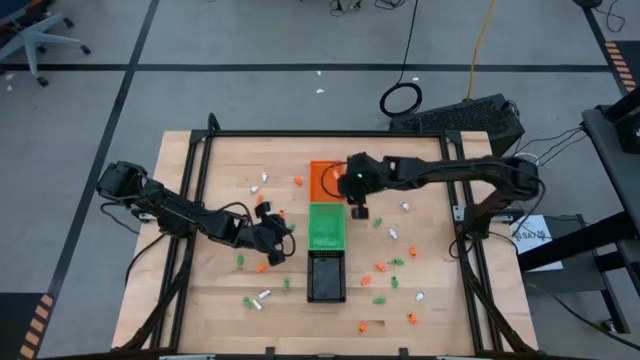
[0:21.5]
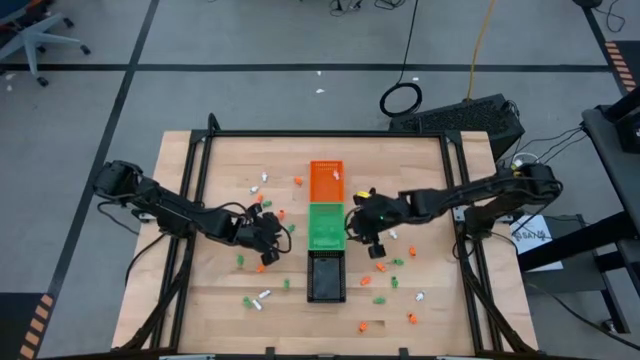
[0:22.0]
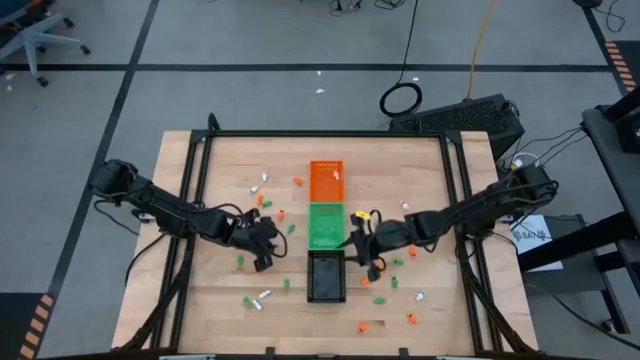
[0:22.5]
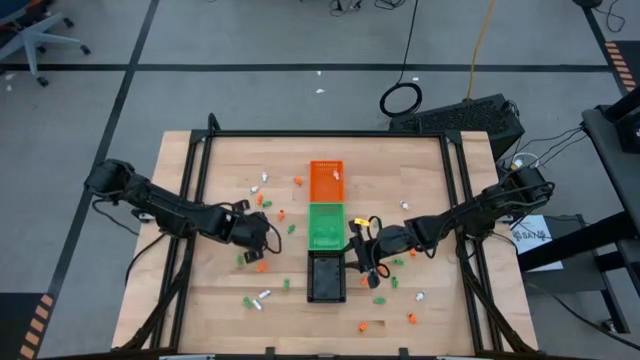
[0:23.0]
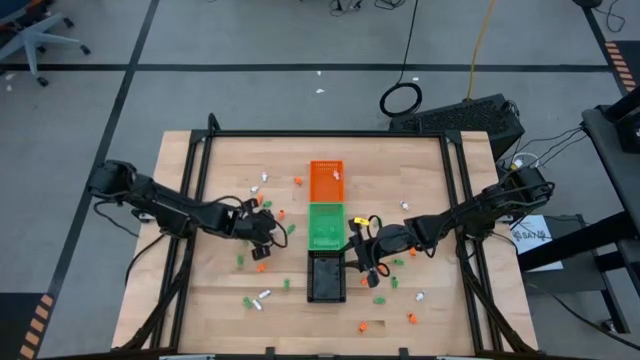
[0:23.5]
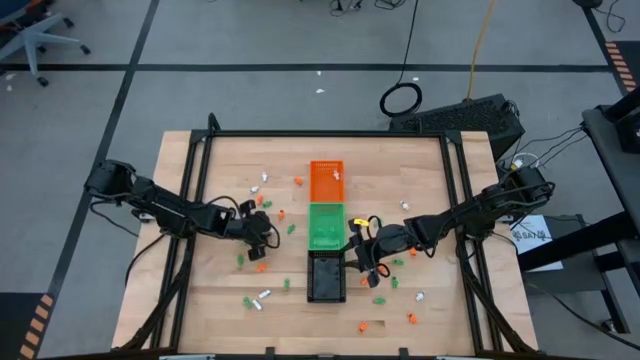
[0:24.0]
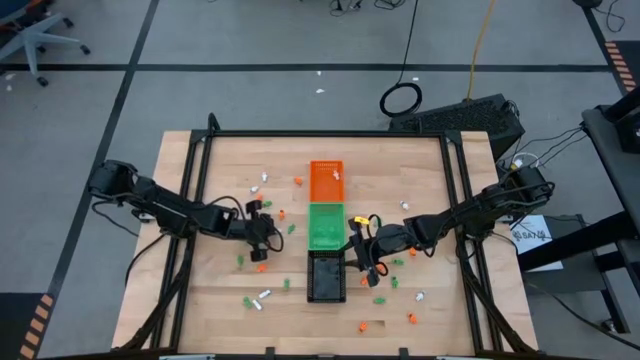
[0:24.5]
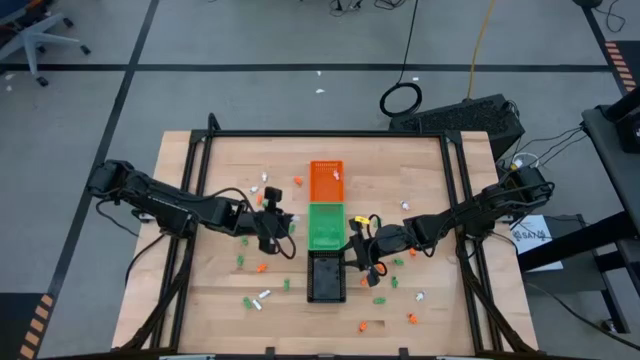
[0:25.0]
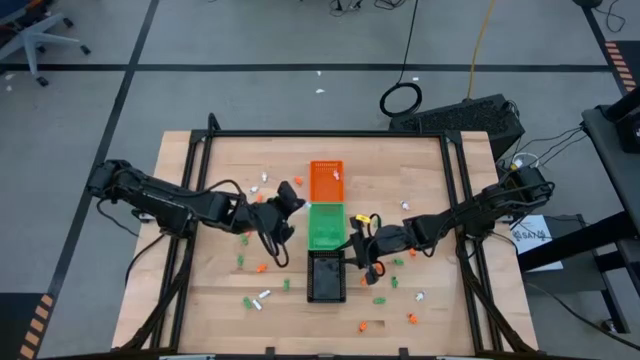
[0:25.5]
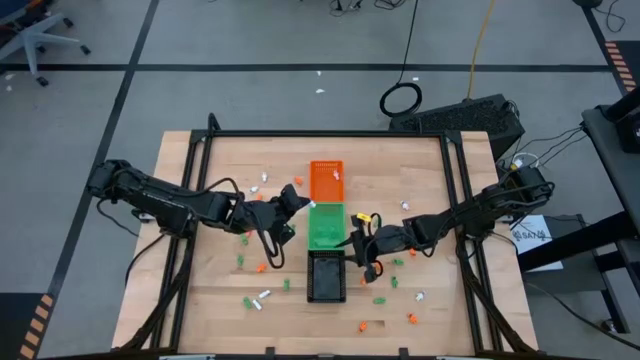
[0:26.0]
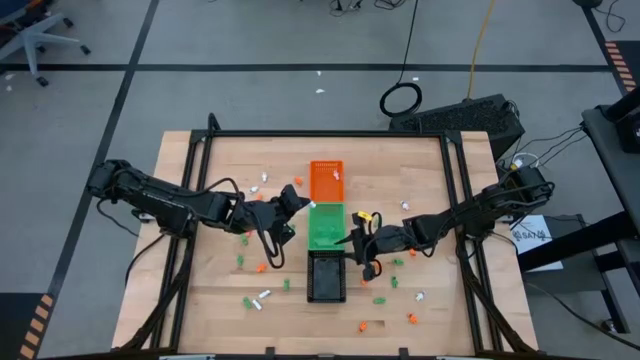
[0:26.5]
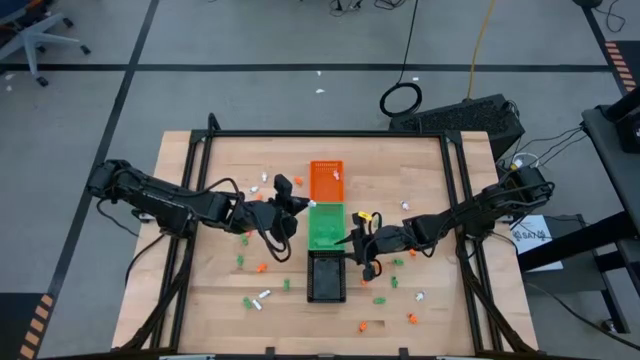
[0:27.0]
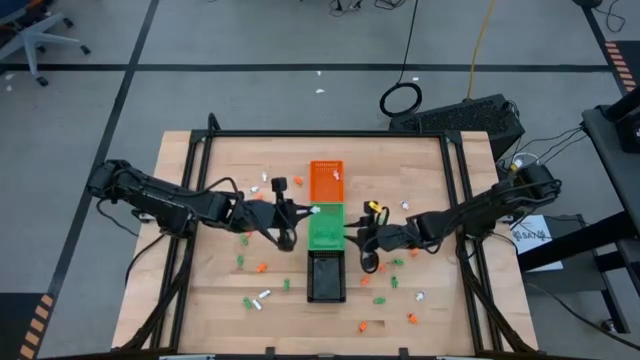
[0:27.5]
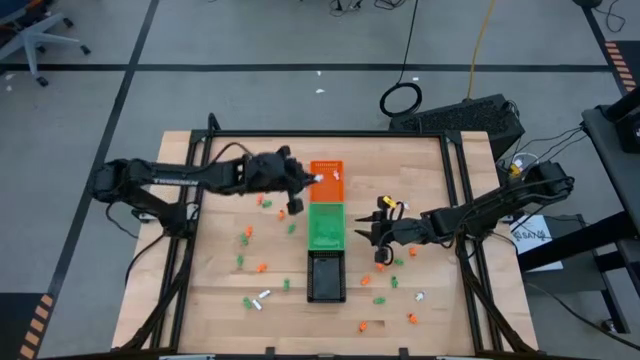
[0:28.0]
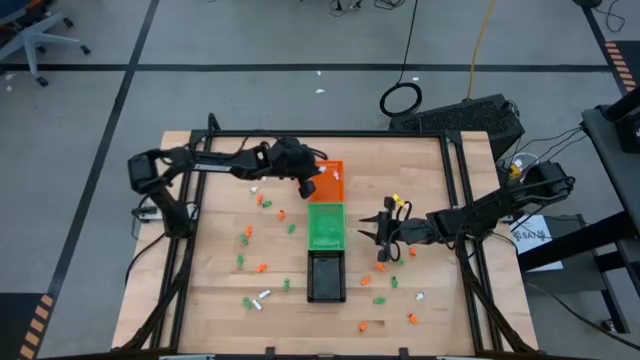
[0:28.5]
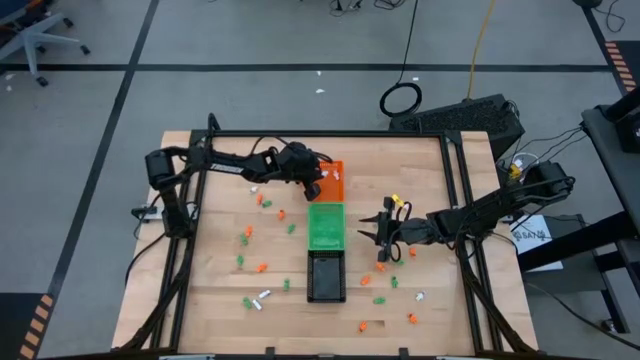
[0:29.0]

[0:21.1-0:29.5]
Task: Sort Halloween decoration
Put the white skeleton toy into the orange bin

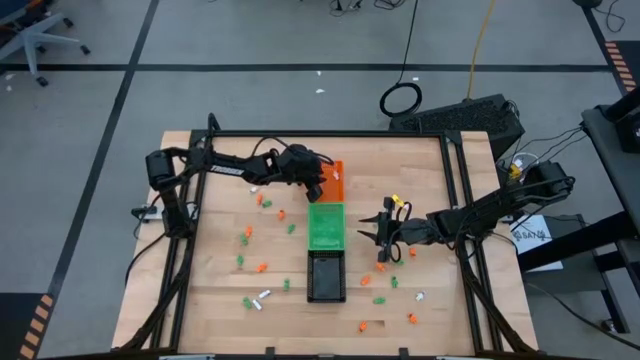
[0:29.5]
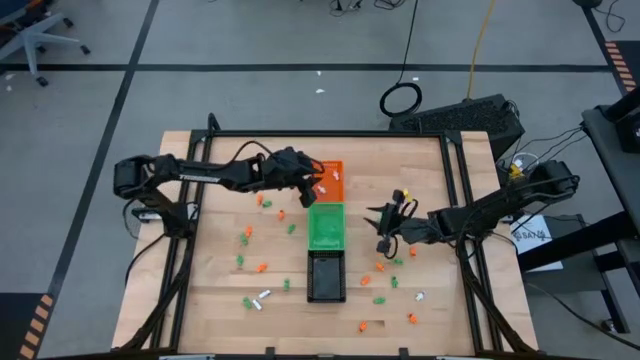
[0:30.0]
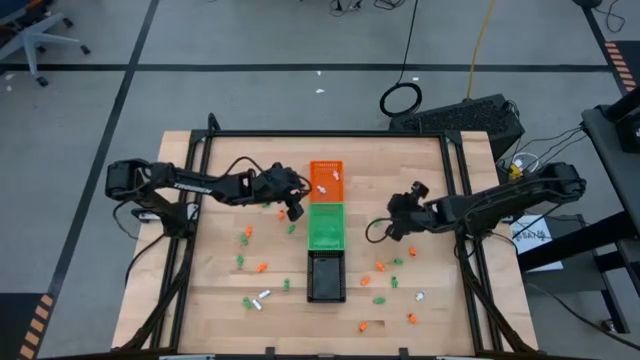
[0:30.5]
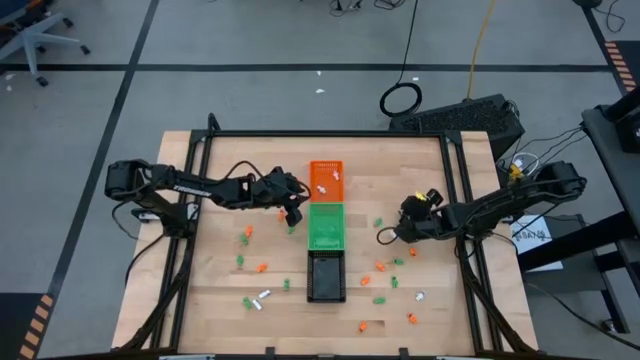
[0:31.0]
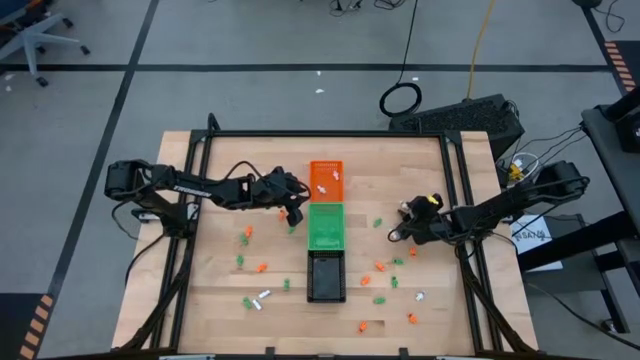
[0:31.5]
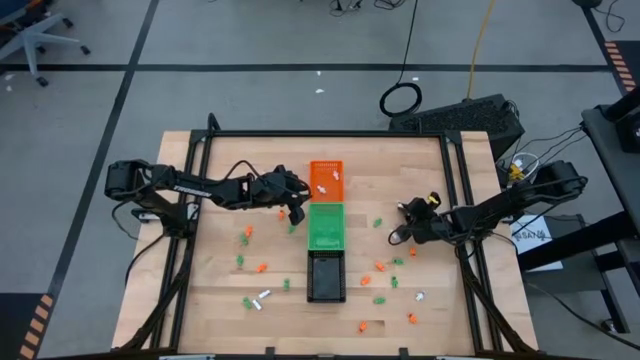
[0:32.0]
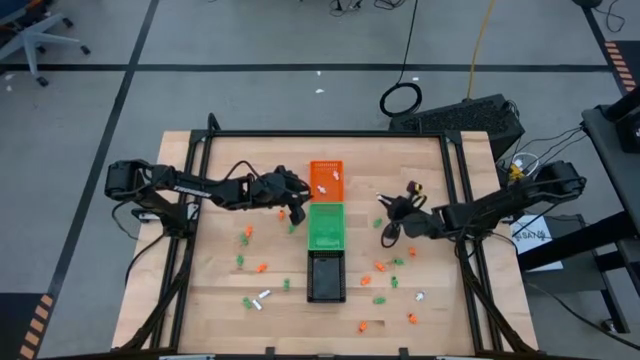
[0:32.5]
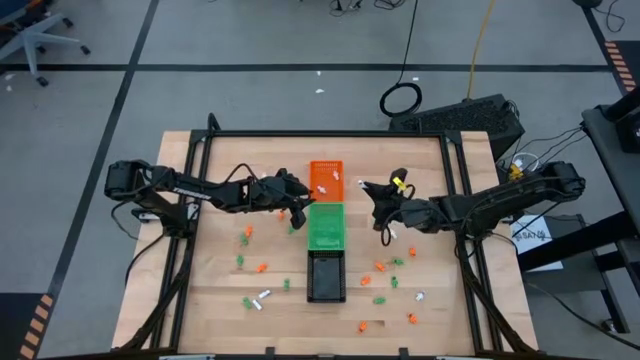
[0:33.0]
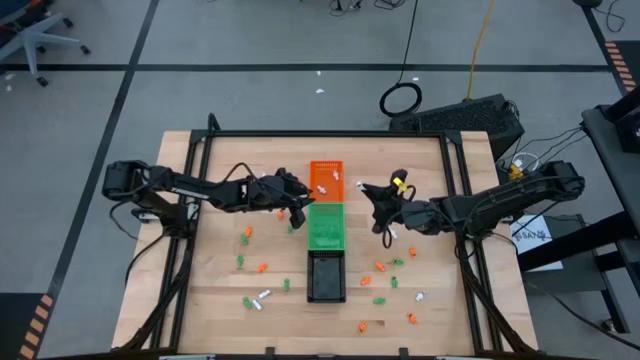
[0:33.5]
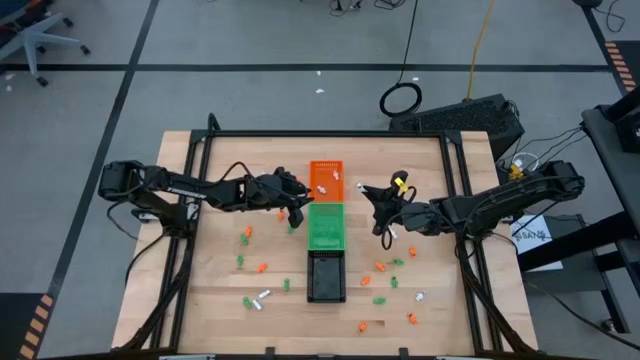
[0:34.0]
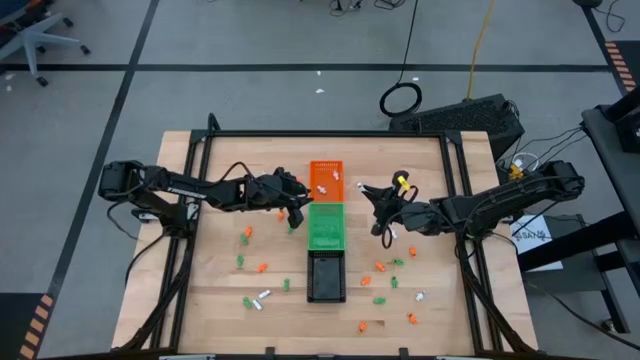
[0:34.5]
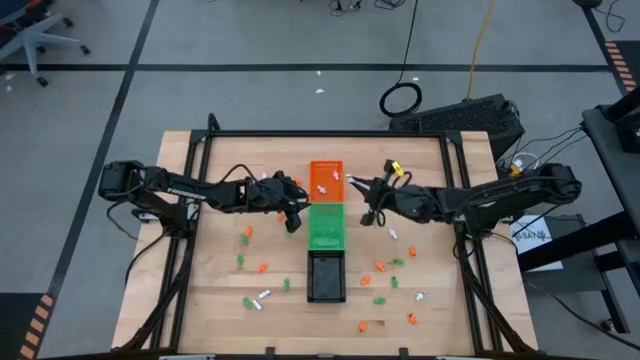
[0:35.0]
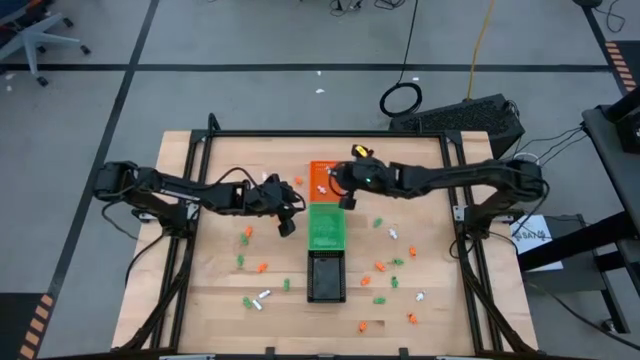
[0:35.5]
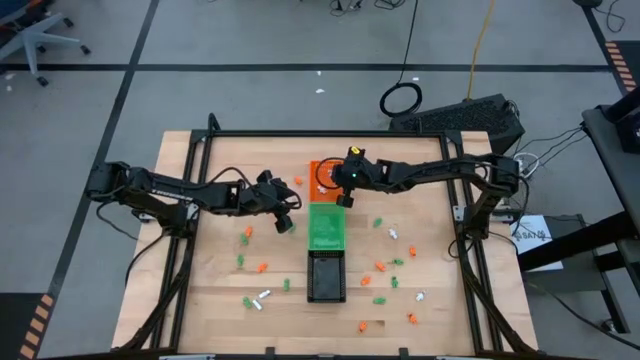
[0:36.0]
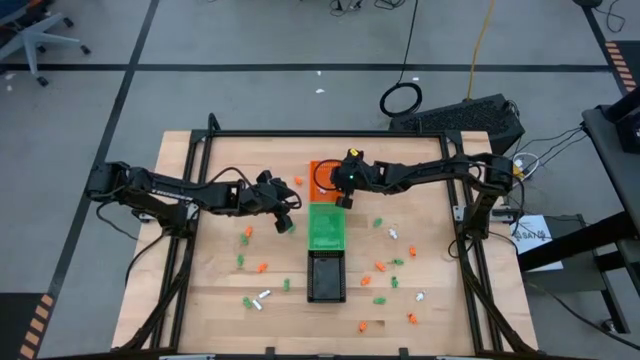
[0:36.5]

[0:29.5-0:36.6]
Put the white skeleton toy into the orange bin

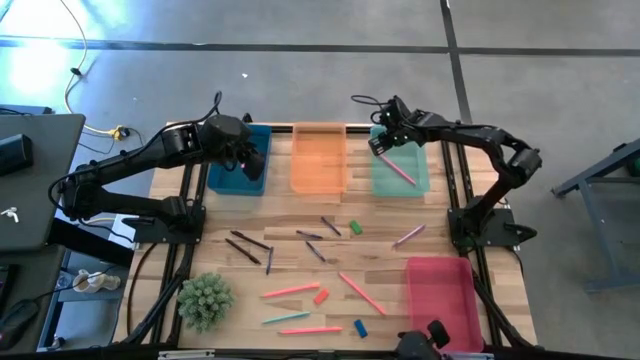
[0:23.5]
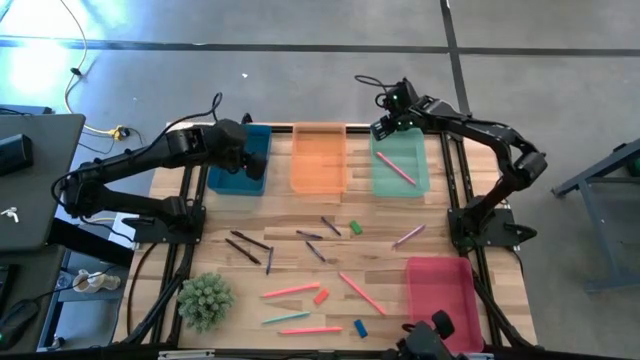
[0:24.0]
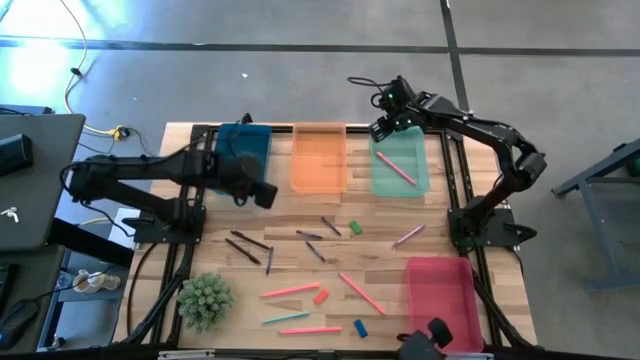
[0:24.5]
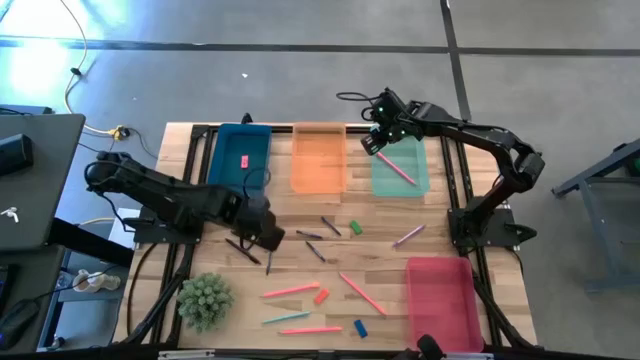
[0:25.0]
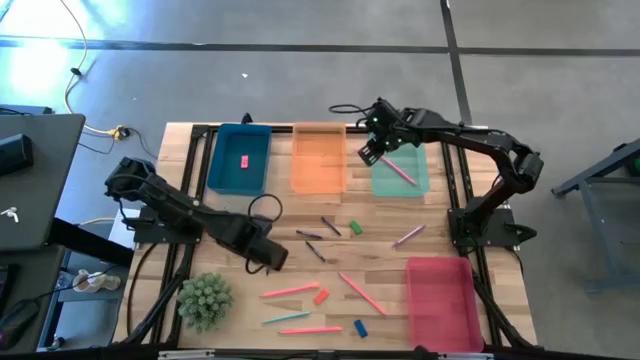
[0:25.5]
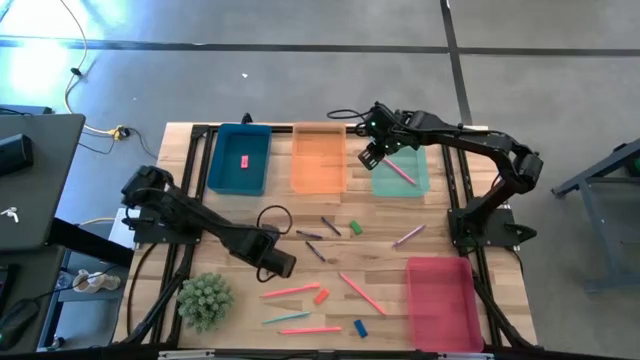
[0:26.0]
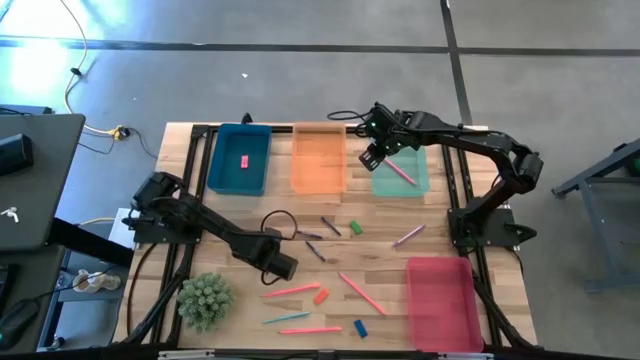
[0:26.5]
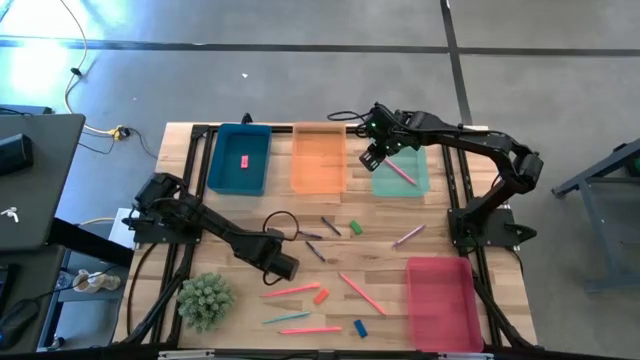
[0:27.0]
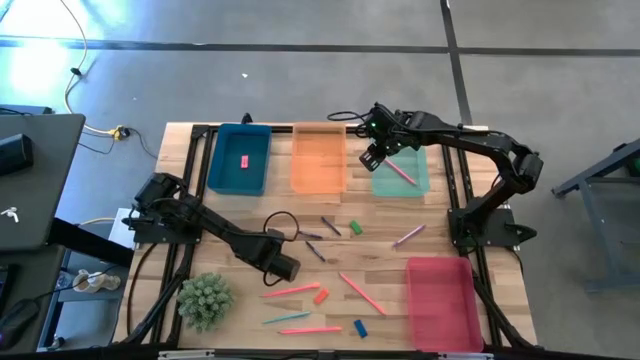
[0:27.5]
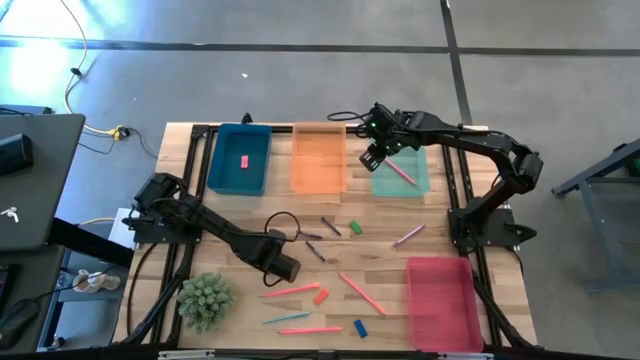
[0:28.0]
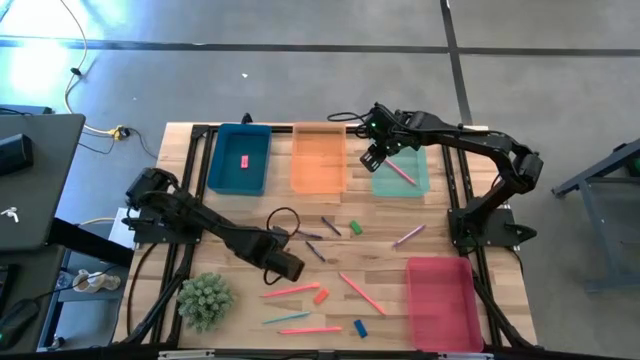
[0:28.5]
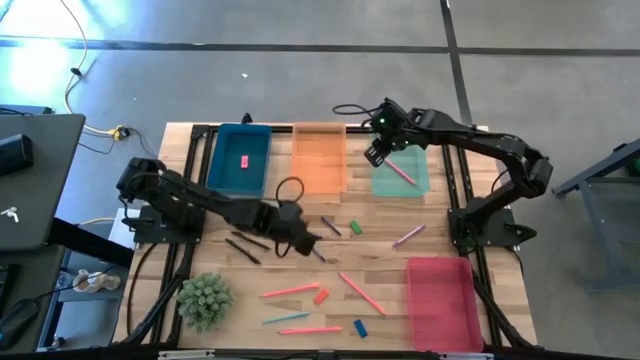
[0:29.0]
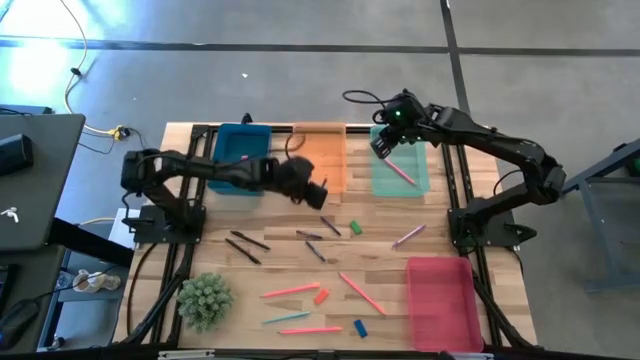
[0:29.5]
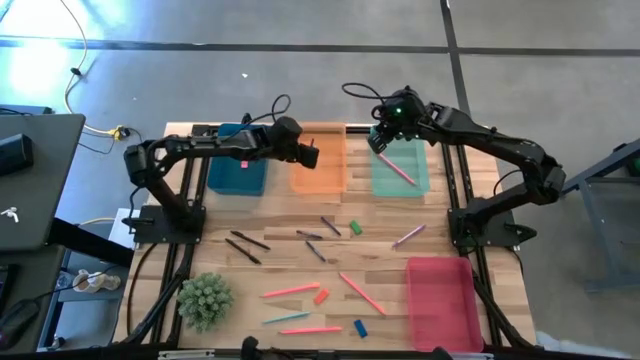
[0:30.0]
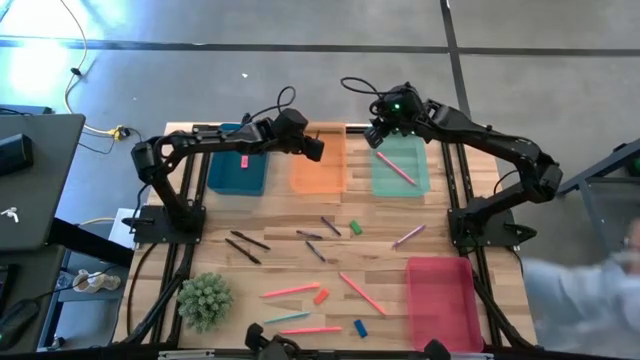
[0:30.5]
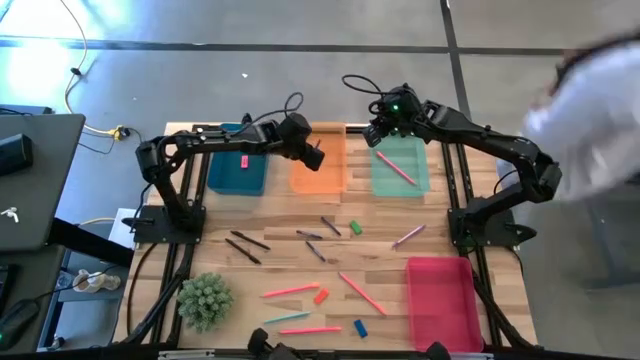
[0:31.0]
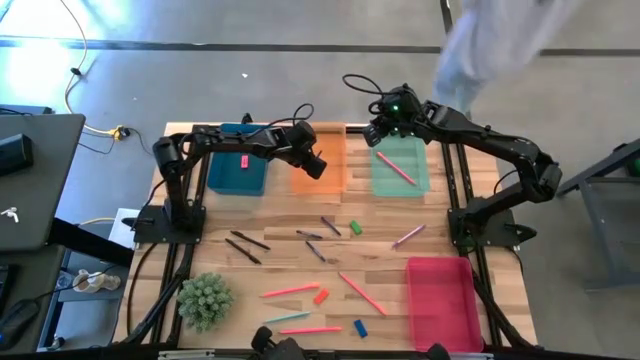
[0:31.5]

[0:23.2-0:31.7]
Task: Sort crayons/erasers/pens/pencils in bins
Put the bottom left blue crayon into the orange bin
